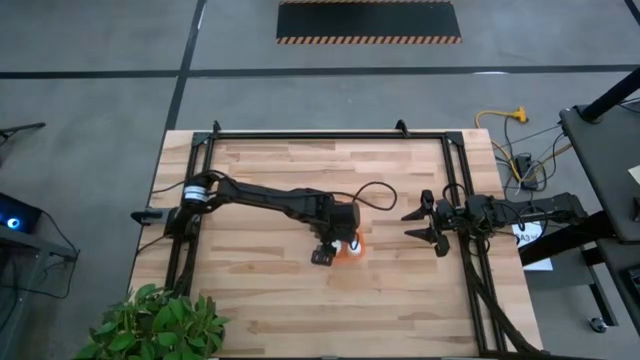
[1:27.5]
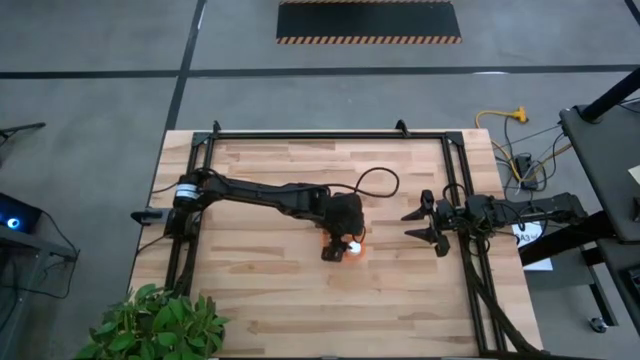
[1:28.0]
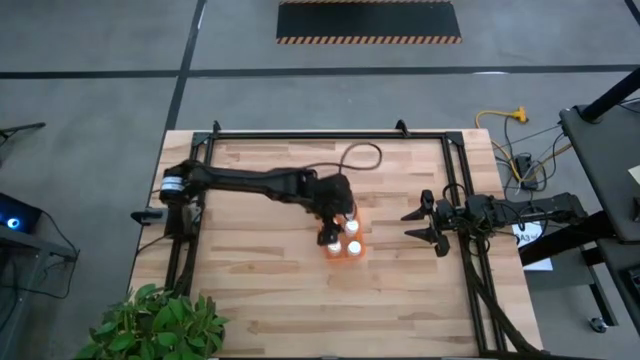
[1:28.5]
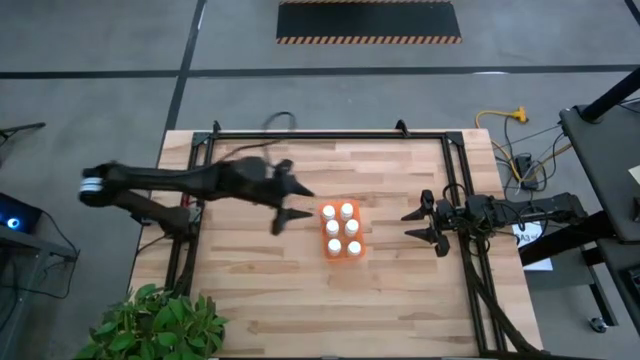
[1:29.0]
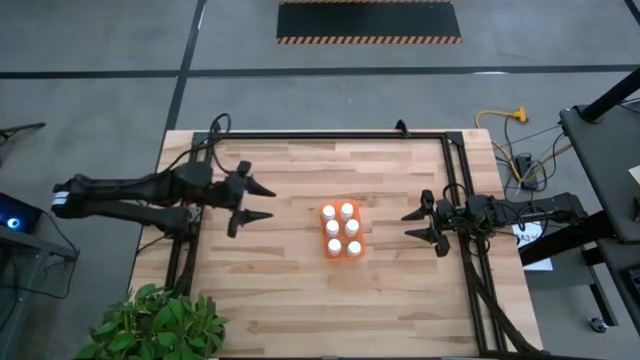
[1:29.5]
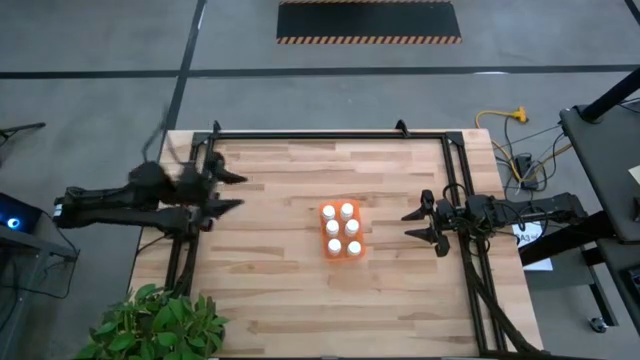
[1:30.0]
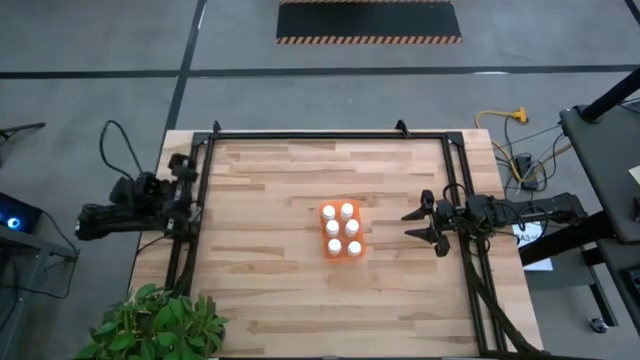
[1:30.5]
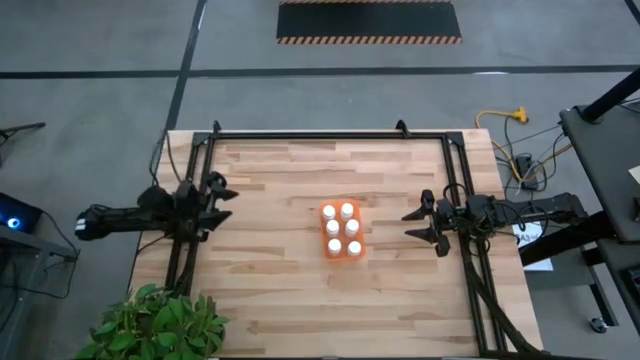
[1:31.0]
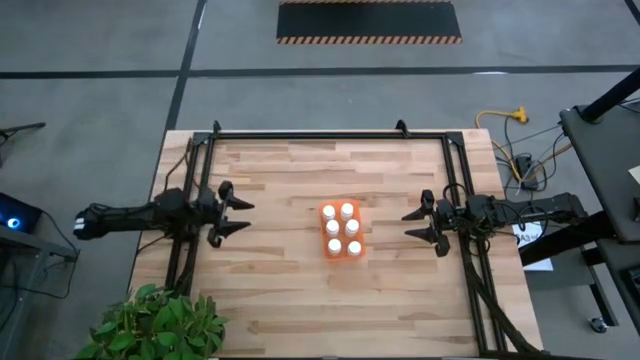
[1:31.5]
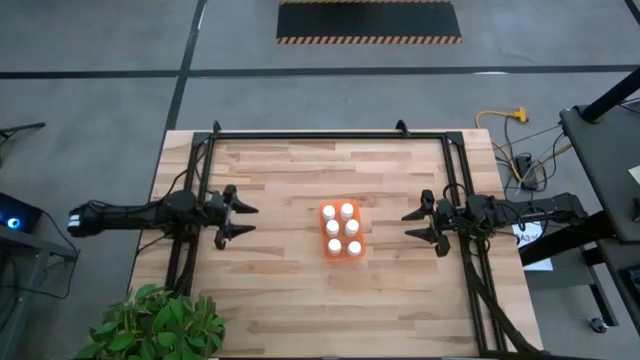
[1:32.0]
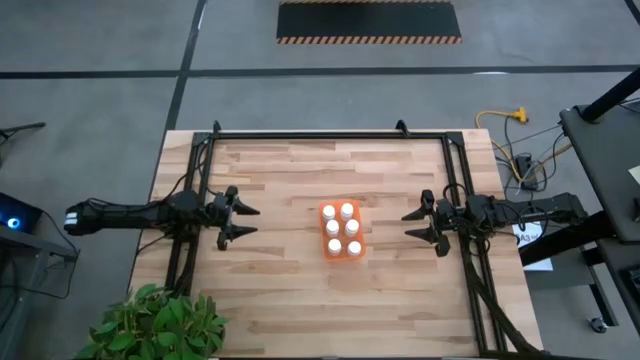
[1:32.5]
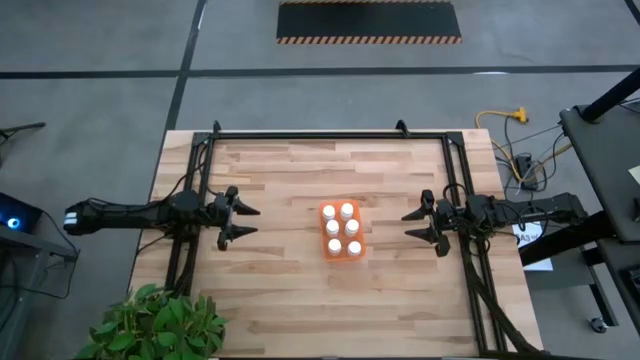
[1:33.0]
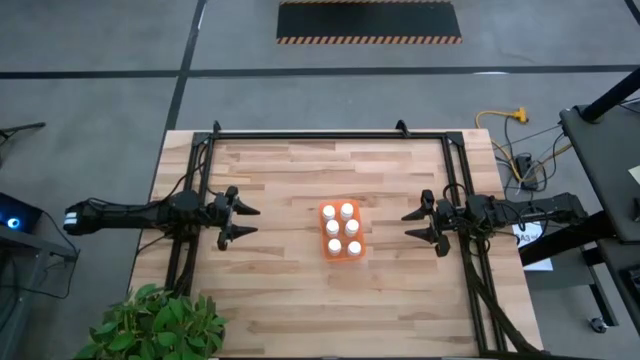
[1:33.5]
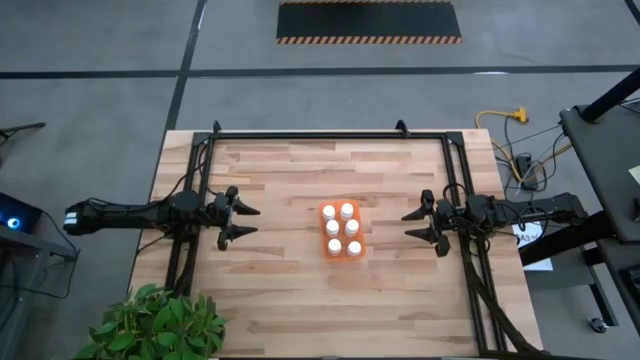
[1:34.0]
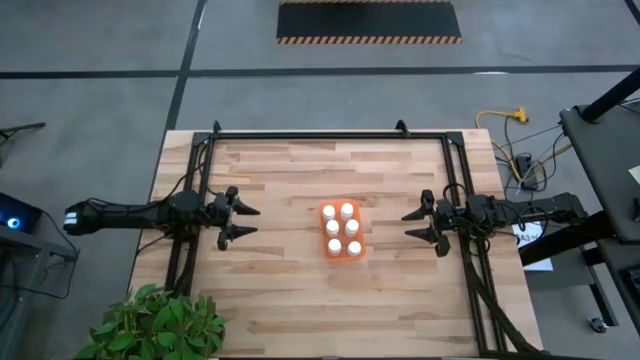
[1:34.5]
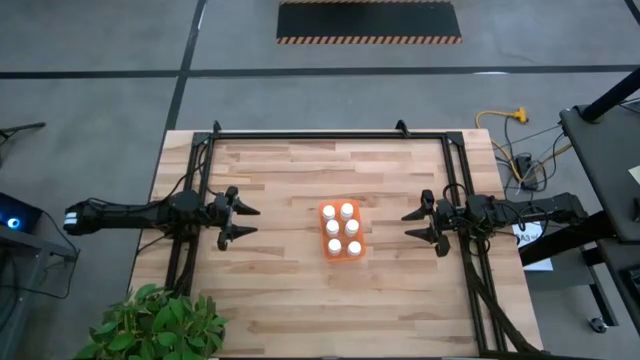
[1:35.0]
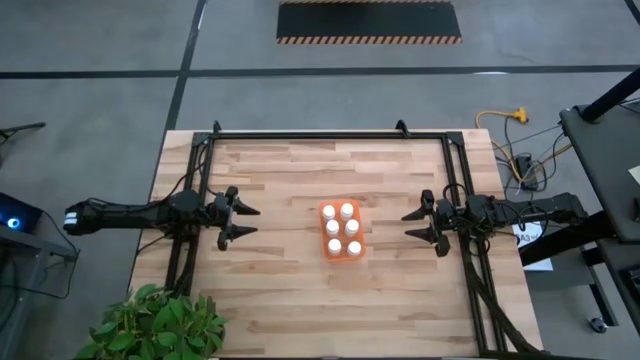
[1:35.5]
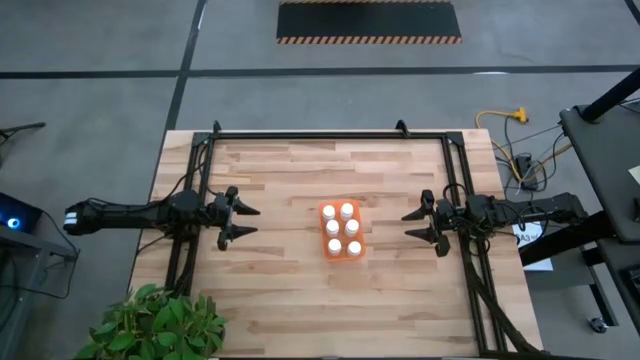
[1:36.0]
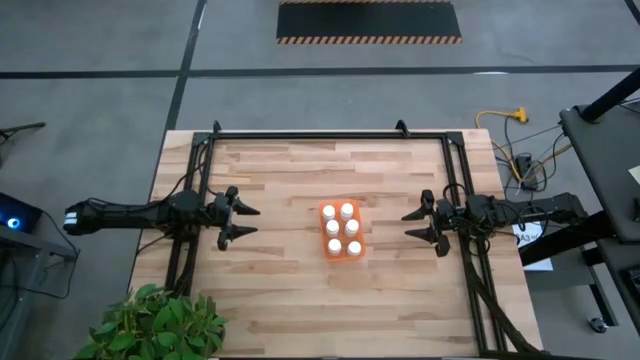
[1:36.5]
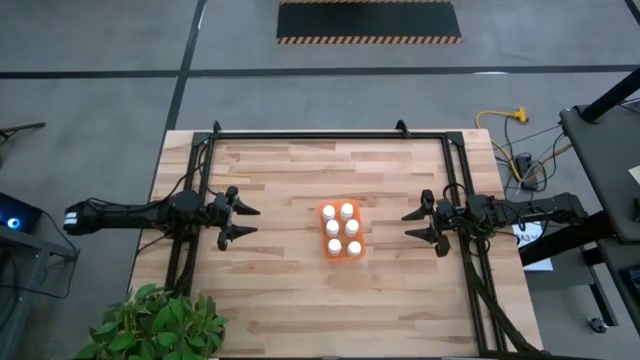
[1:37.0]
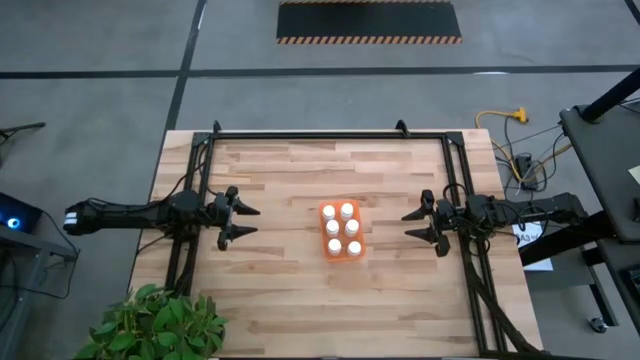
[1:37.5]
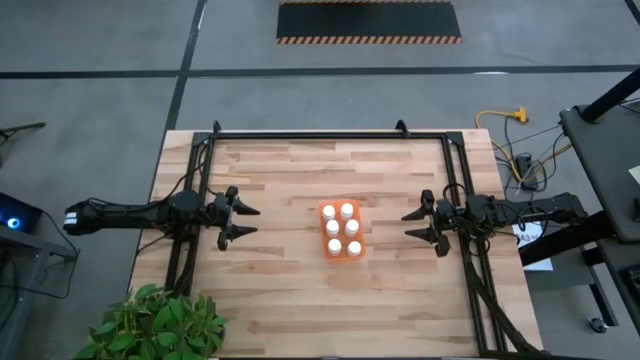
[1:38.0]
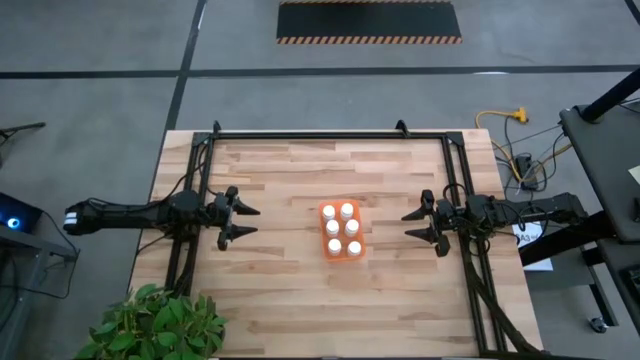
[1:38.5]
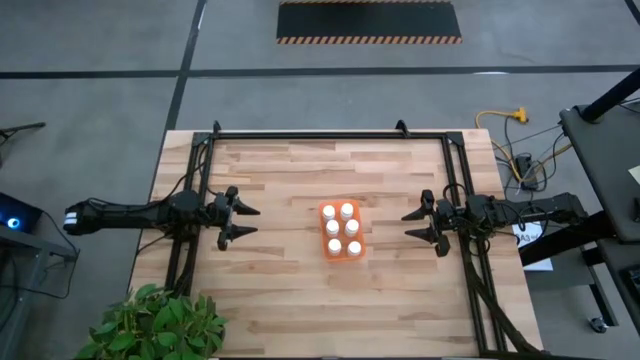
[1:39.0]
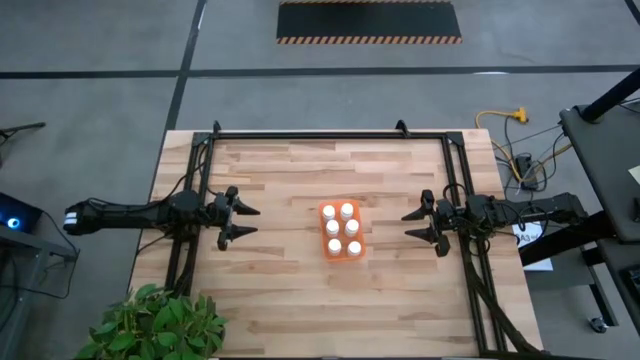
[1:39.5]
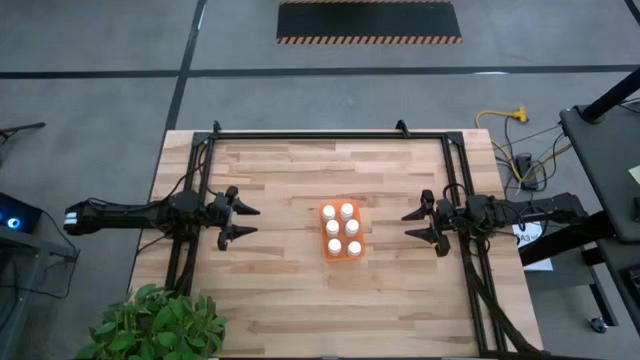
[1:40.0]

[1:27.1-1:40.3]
Task: Pick and place pill bottles into a basket
Return to Home Position

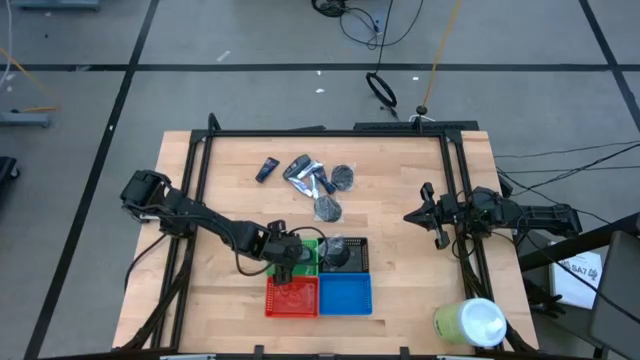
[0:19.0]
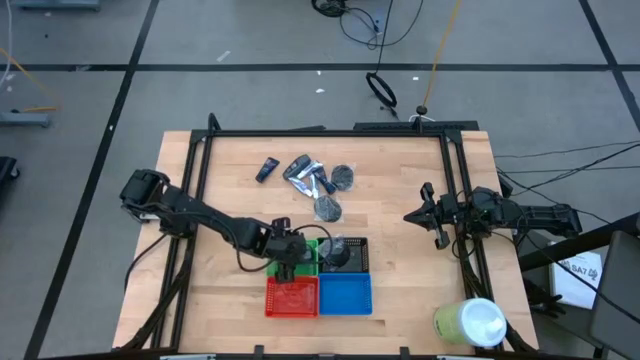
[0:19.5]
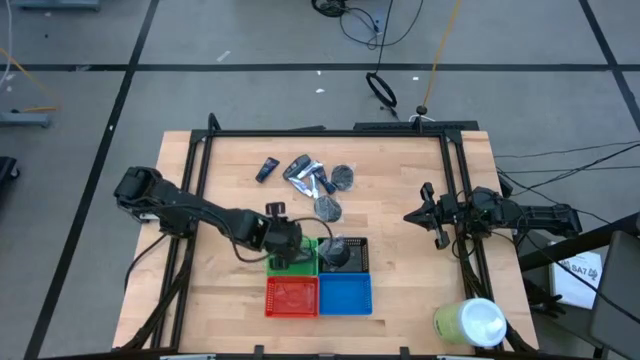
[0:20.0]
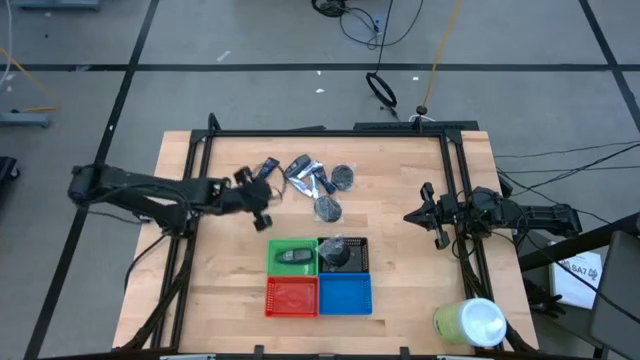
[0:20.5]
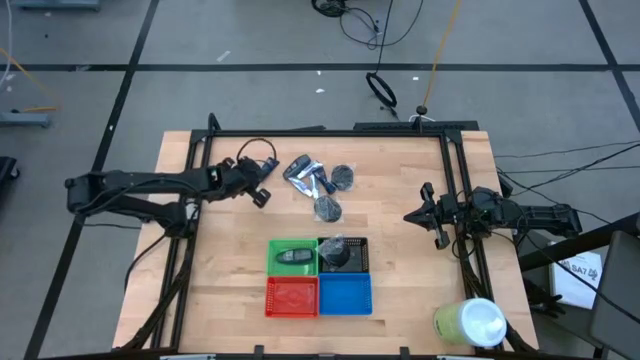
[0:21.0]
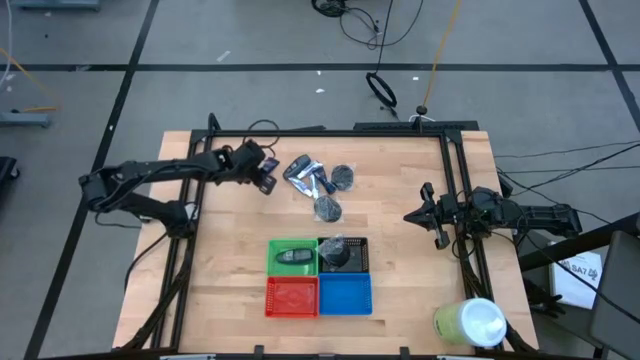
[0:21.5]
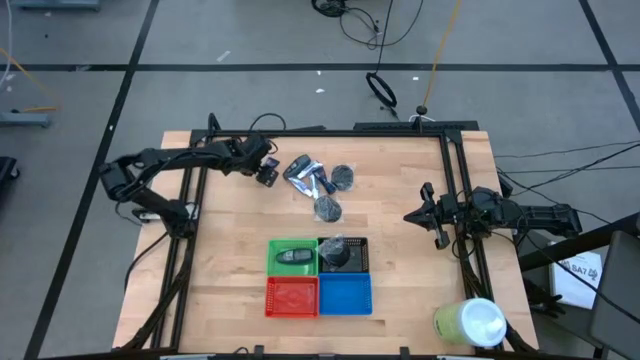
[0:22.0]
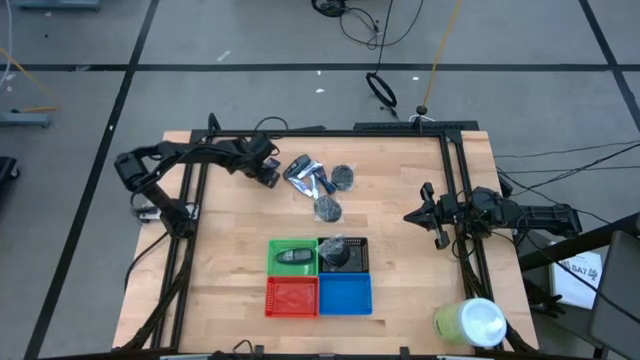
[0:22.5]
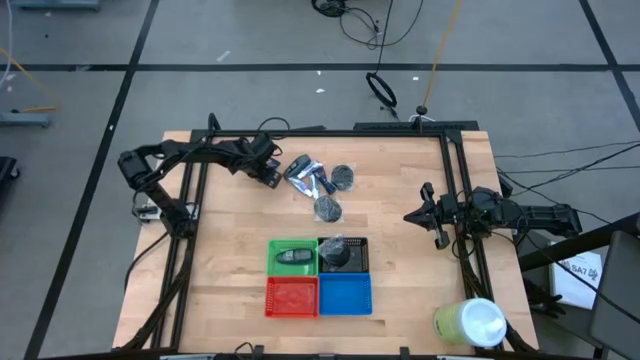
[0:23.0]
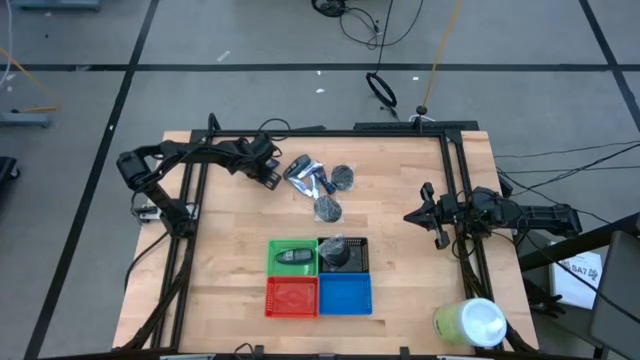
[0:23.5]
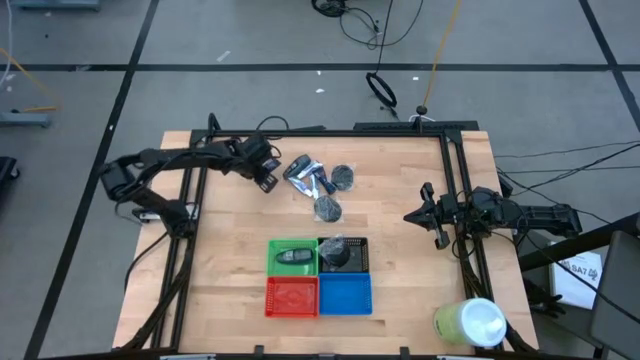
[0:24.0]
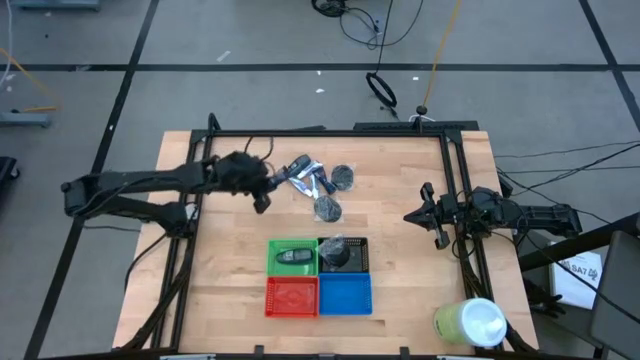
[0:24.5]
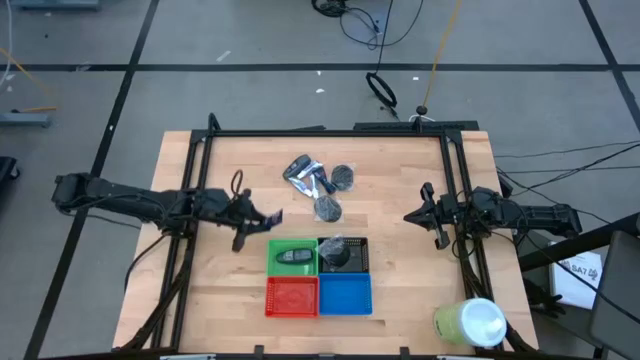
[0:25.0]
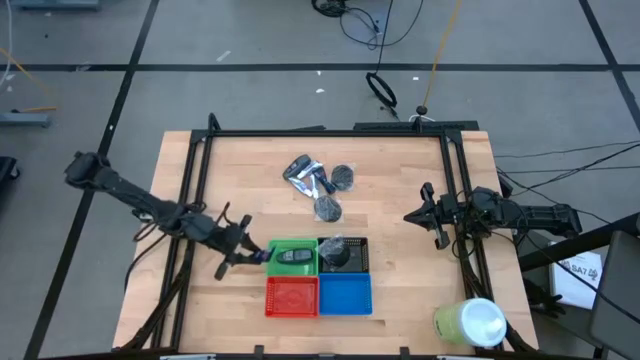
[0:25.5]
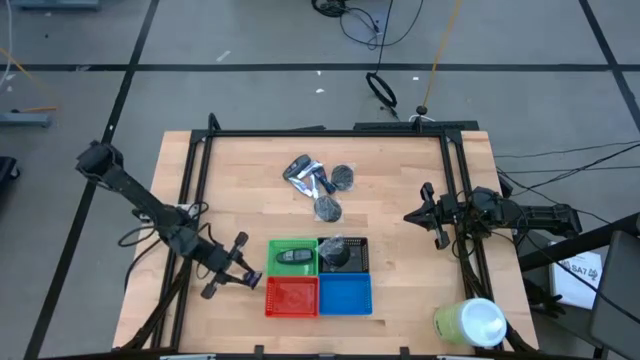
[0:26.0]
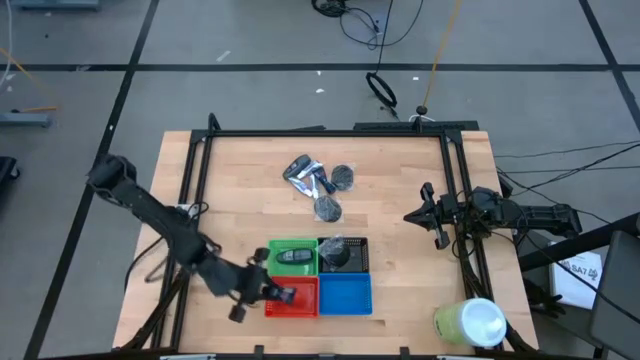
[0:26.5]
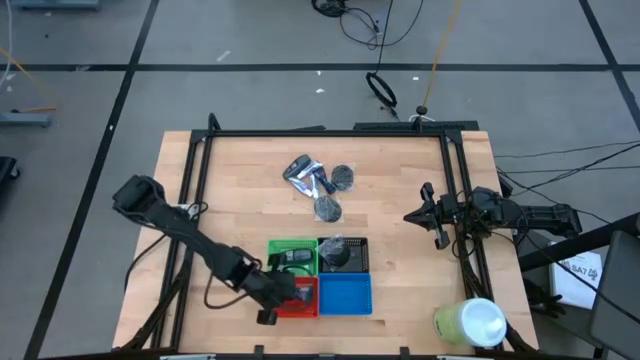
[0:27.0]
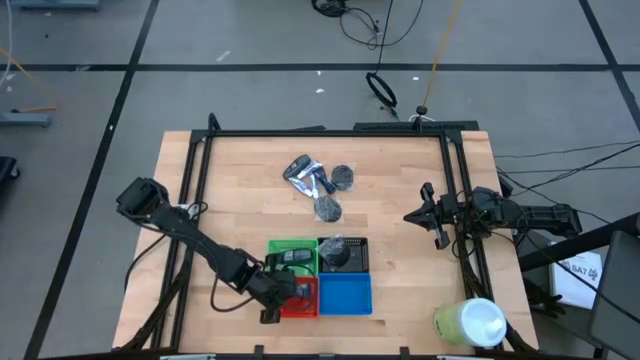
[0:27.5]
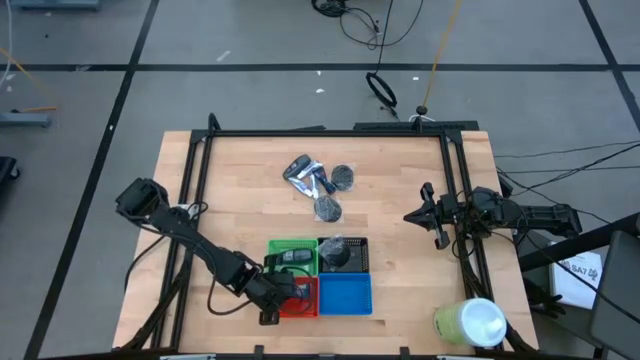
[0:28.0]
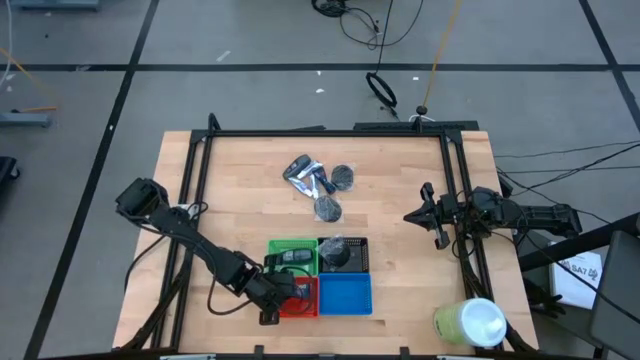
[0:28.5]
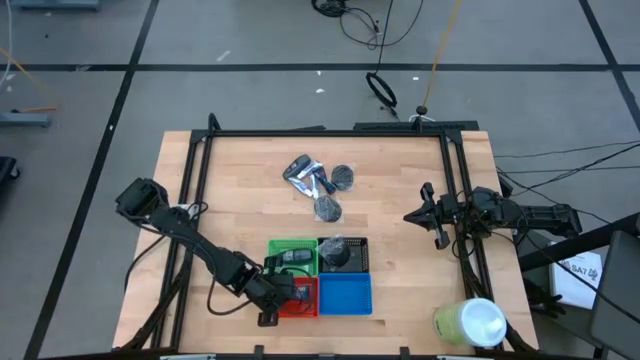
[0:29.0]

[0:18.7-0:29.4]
Task: Pick & Place Travel size toiletries
Put the left blue shave cream into the orange bin
